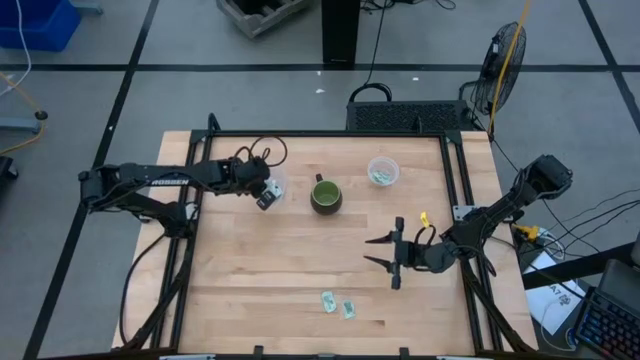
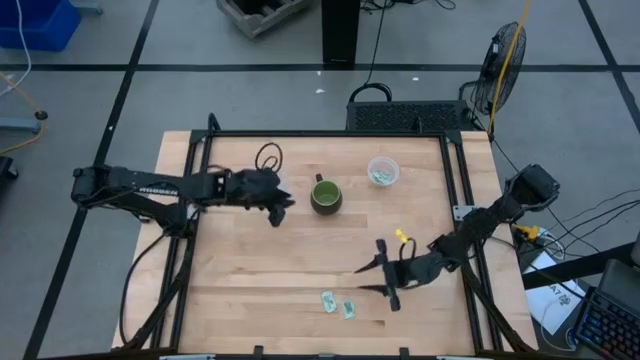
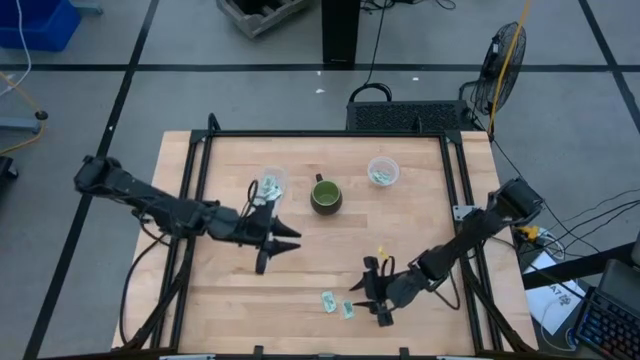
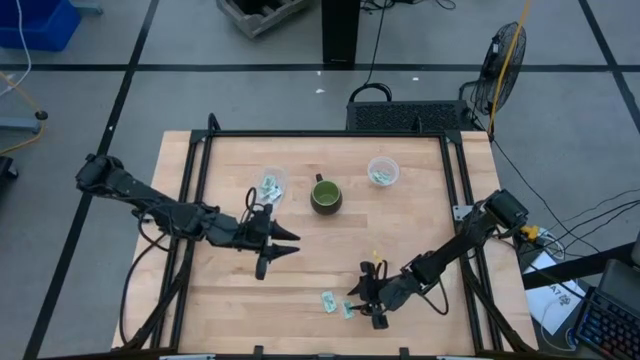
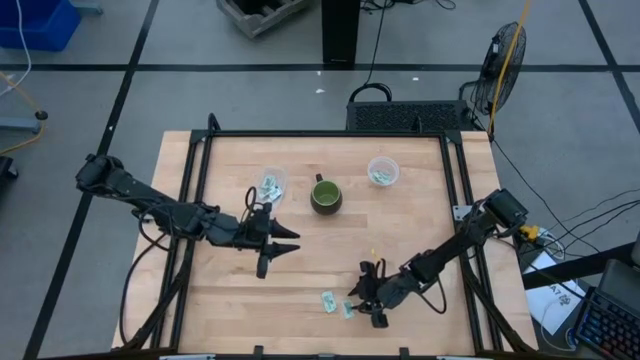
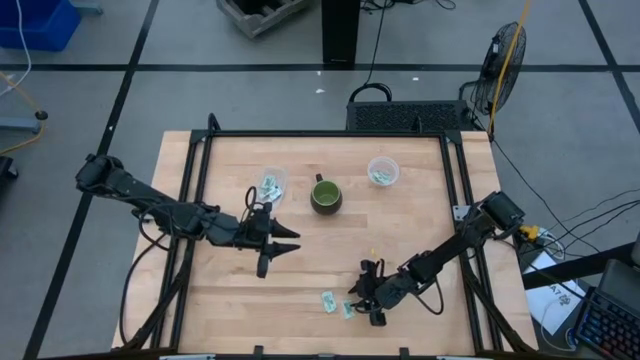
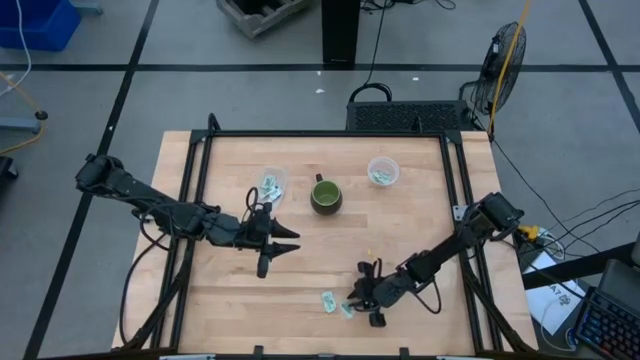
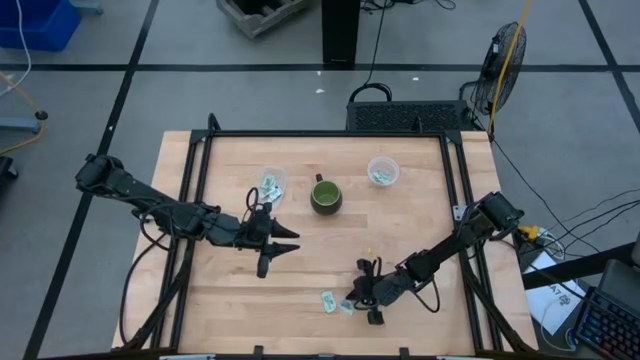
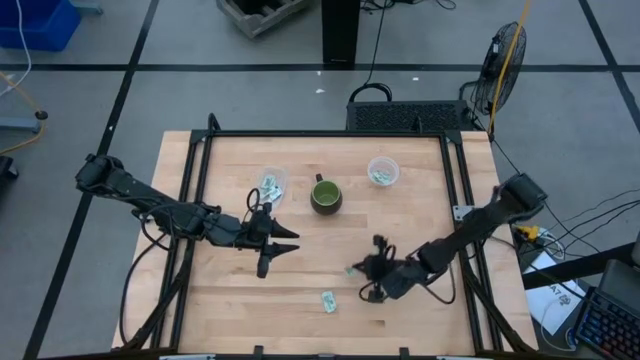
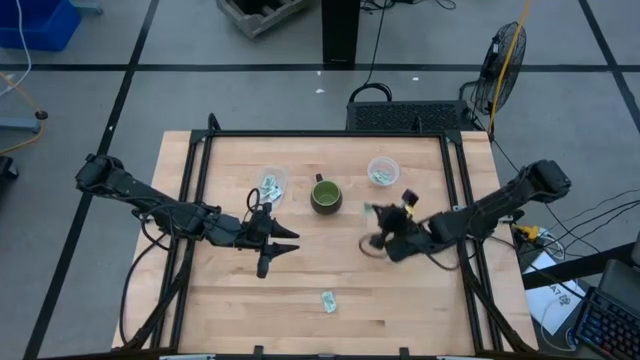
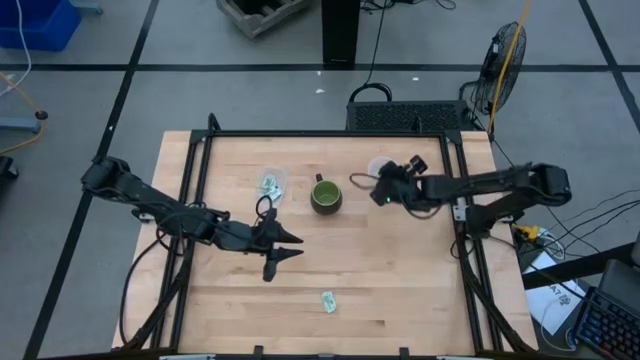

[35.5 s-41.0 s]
Task: Pick and place items into bin
Put the green stevia packet into the right transparent bin

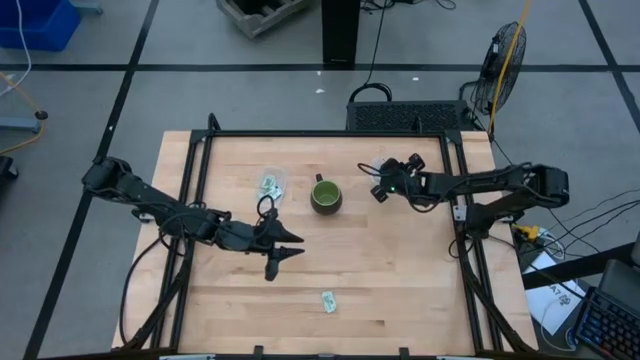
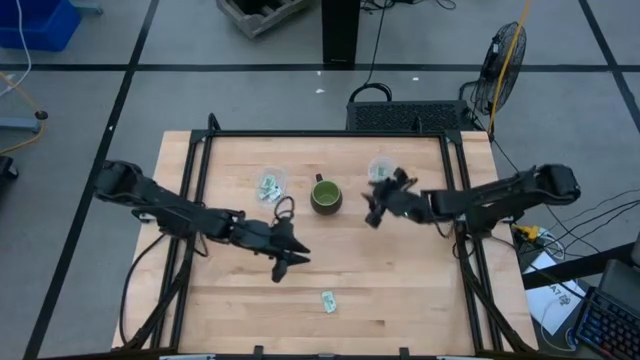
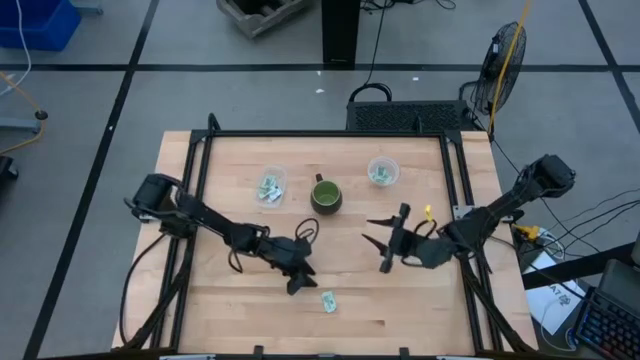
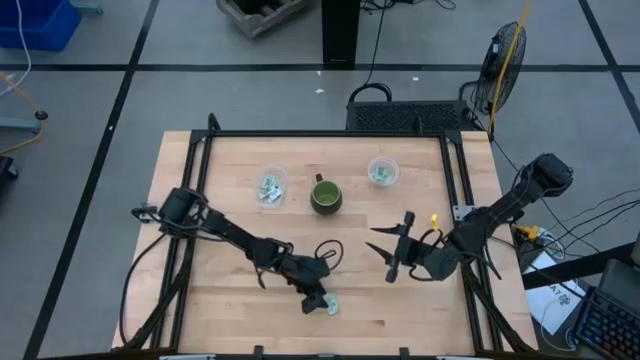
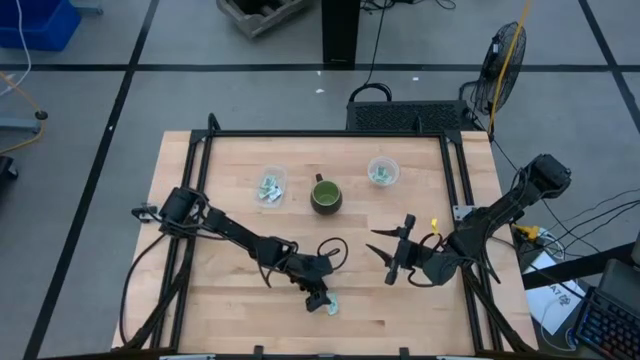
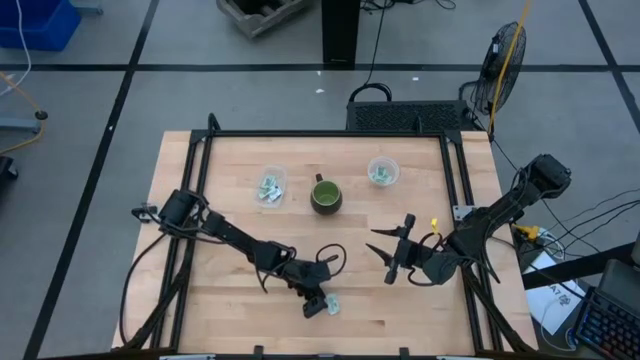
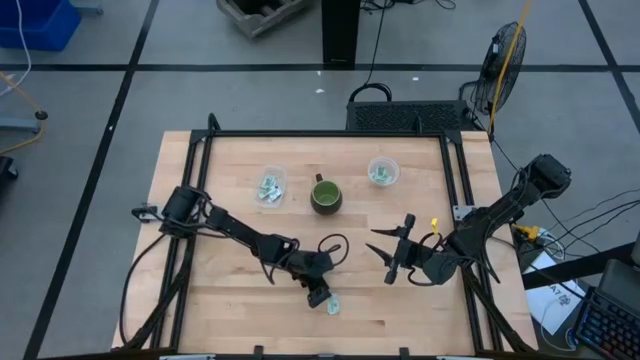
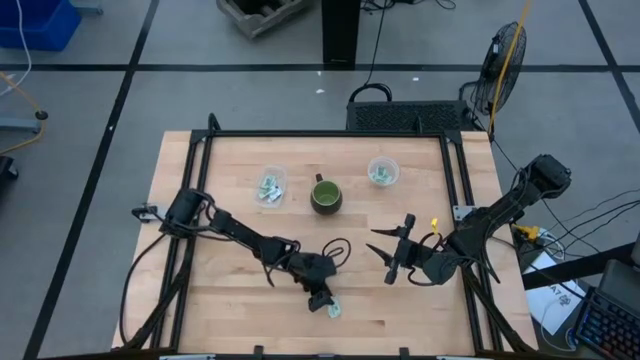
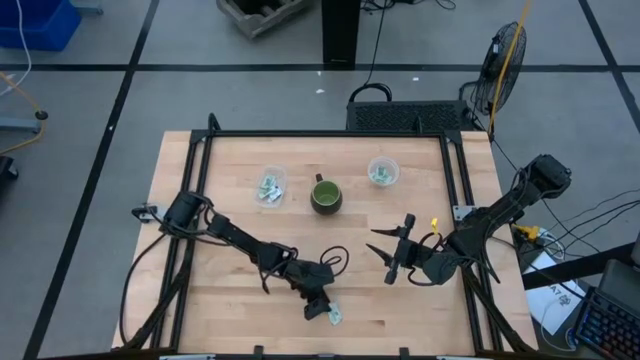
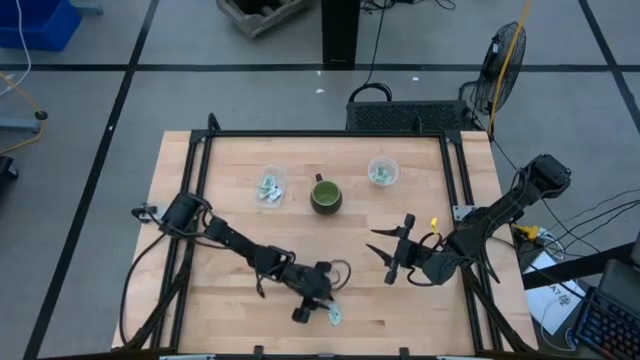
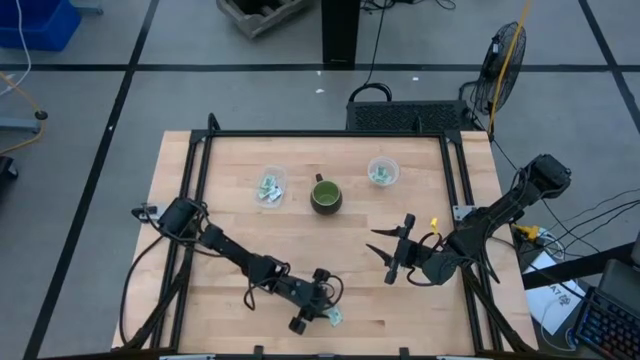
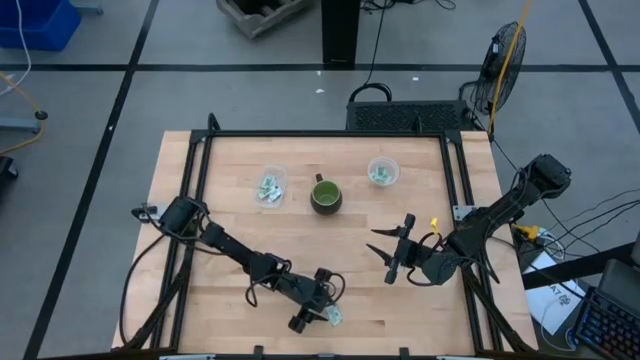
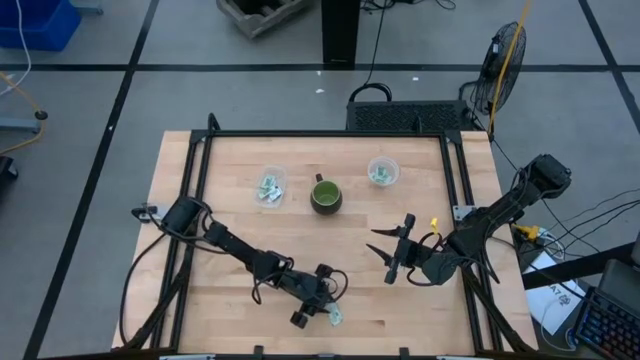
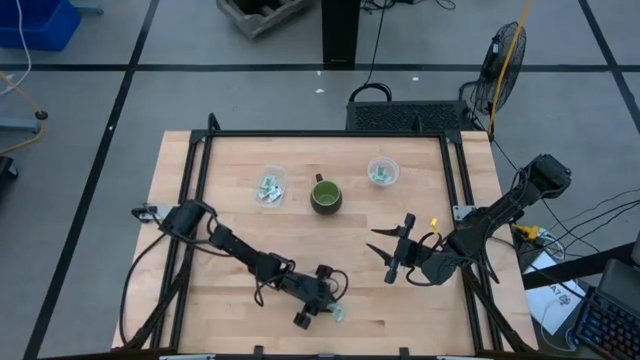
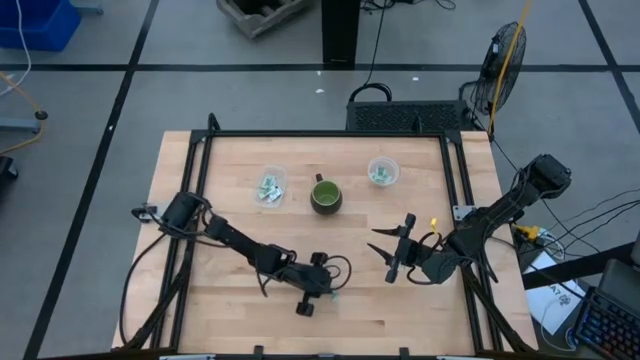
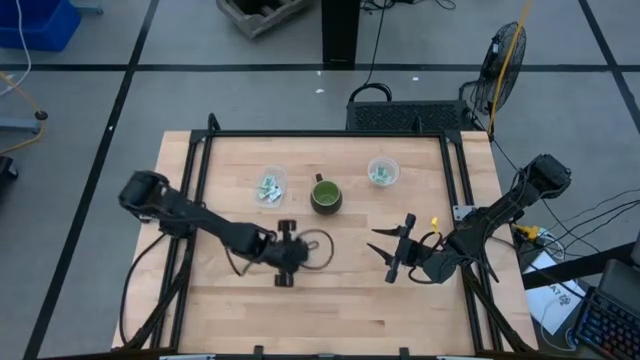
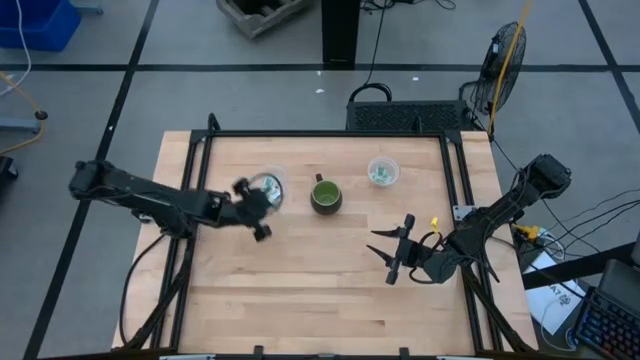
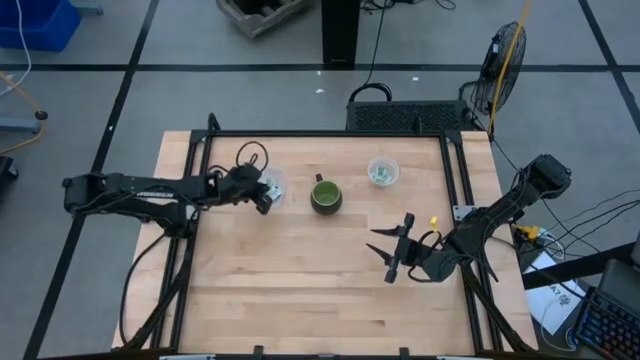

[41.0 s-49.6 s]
Put the green stevia packet into the left transparent bin

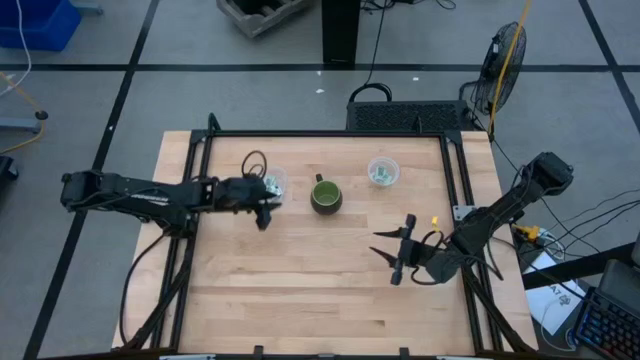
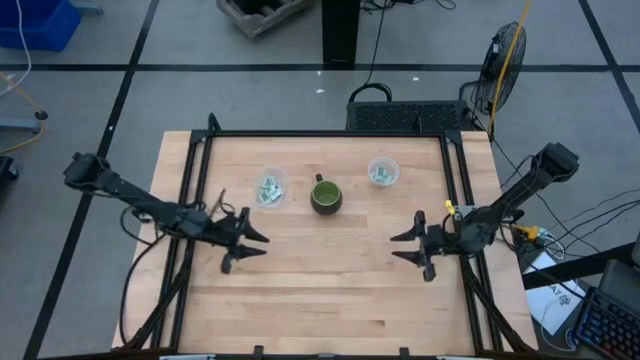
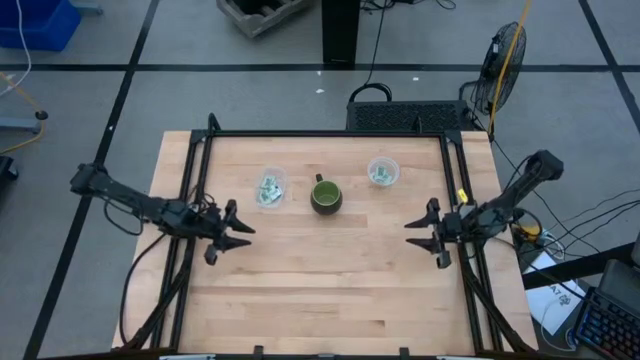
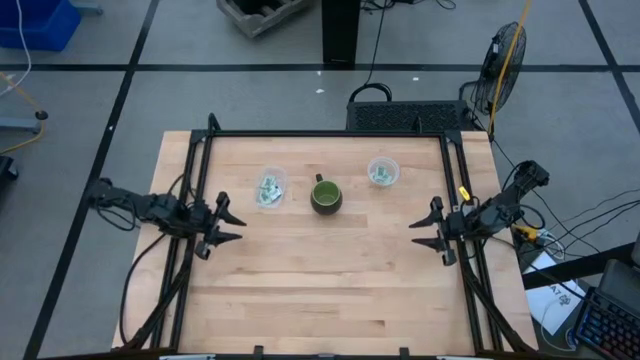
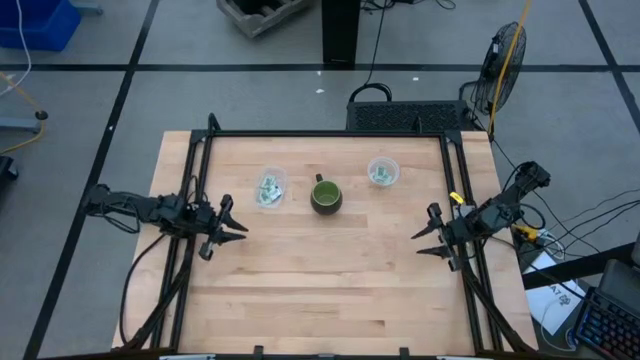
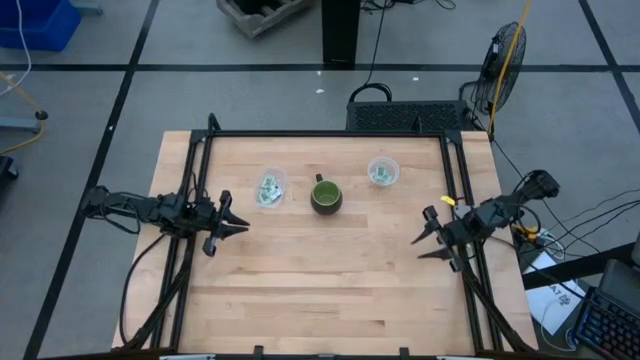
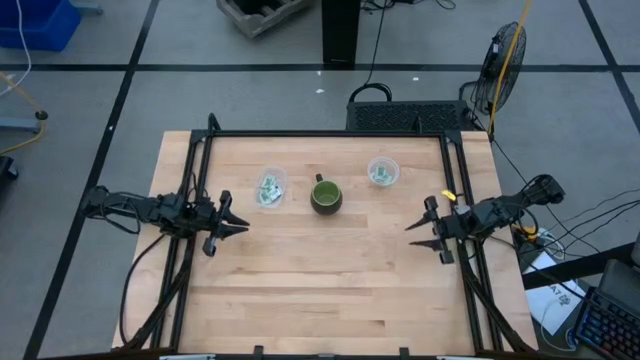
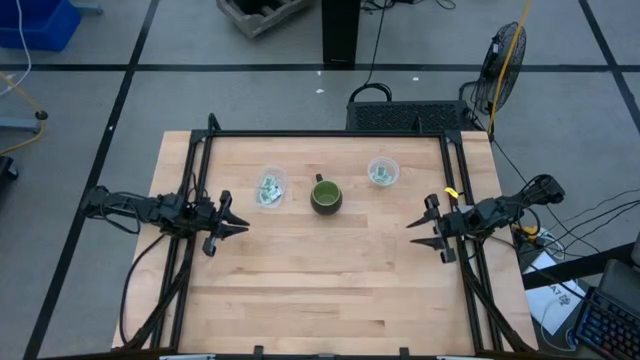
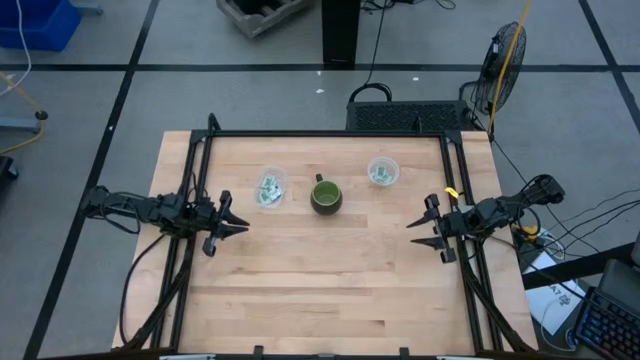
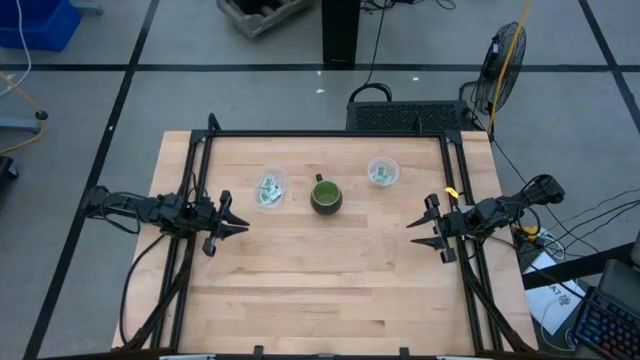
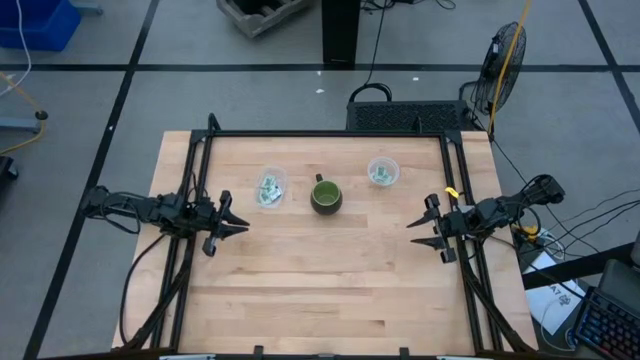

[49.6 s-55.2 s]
Return to Home Position

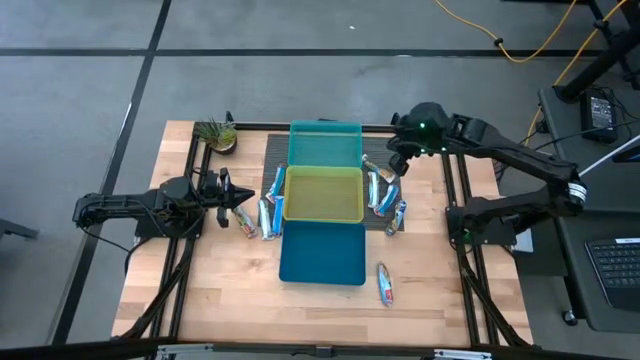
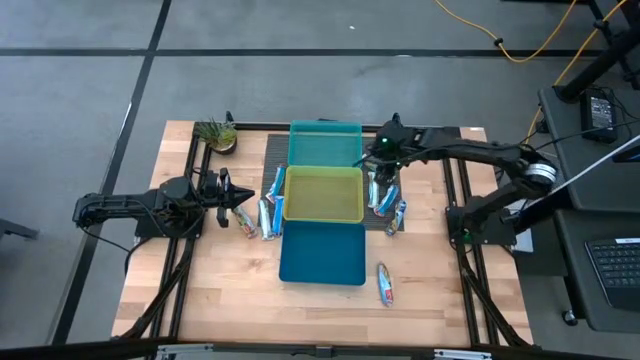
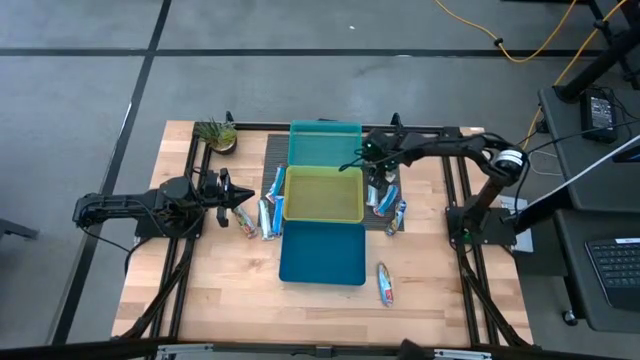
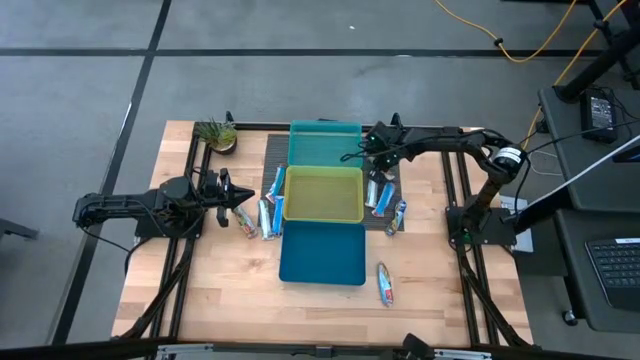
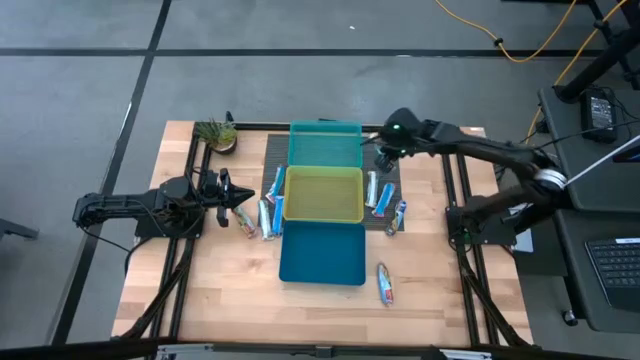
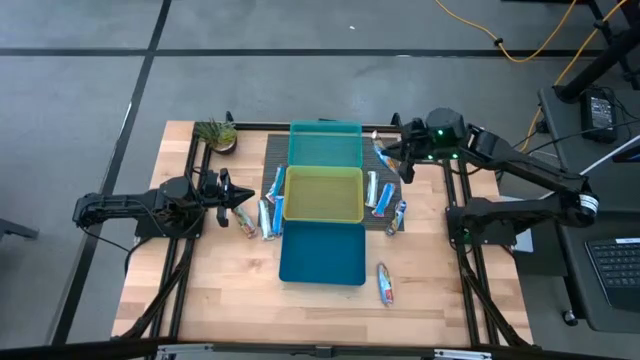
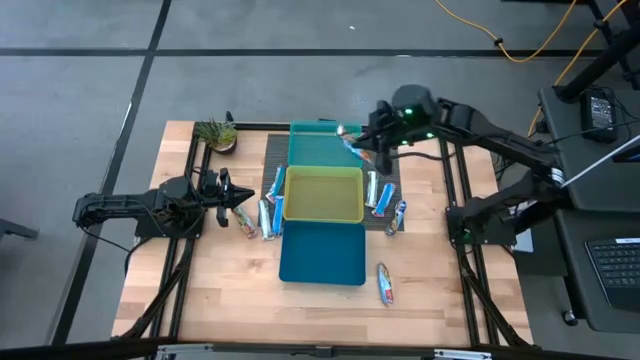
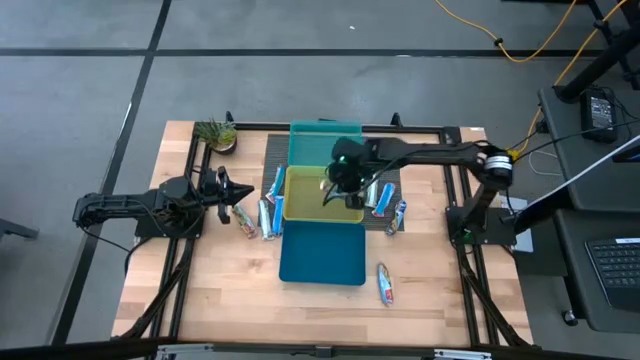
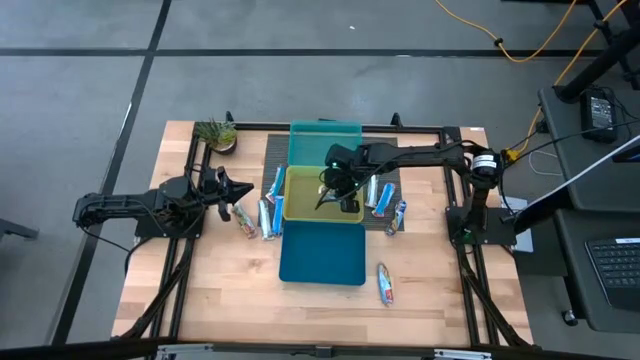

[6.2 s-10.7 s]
Task: Pick and place Granola Bars by type
Put the yellow granola bar into the yellow bin
